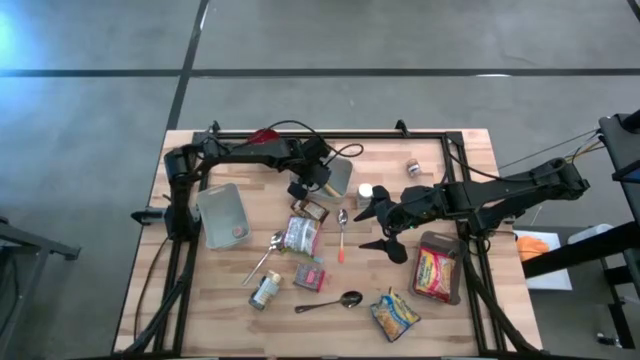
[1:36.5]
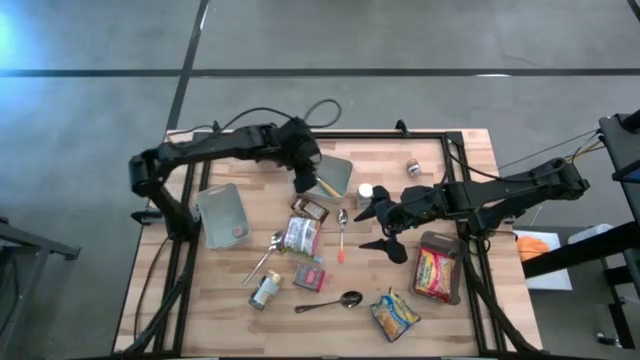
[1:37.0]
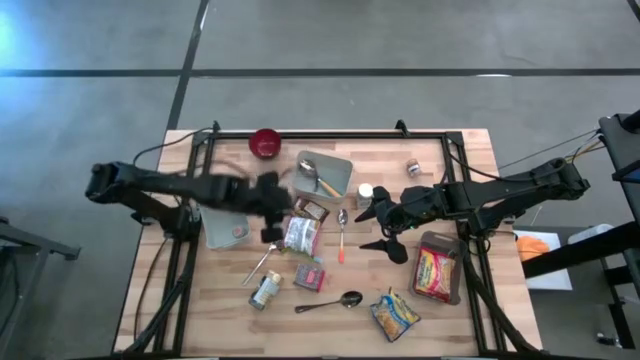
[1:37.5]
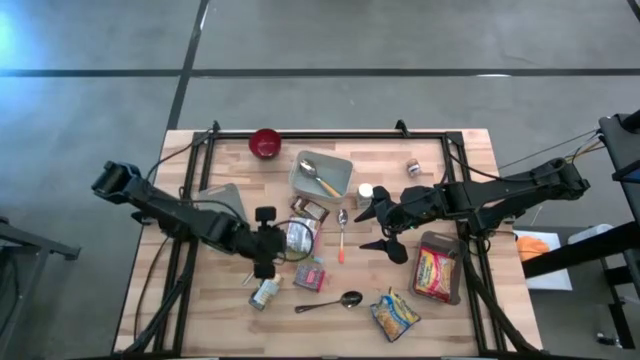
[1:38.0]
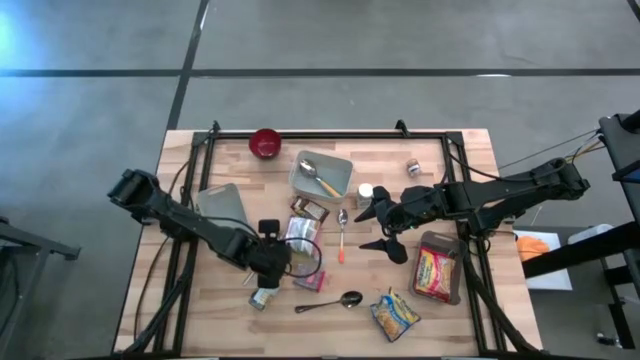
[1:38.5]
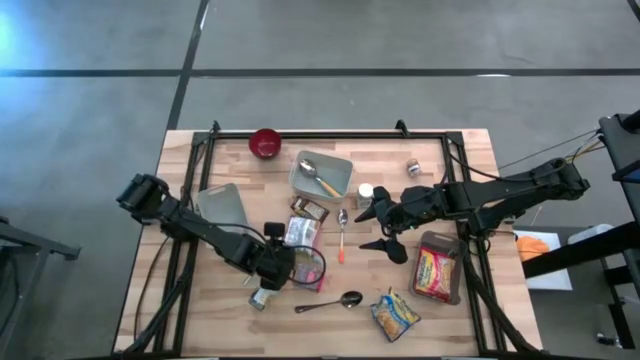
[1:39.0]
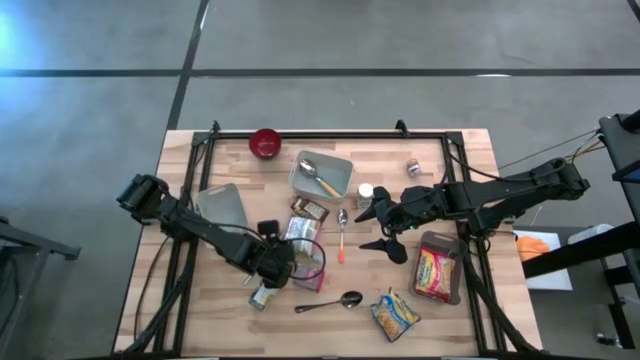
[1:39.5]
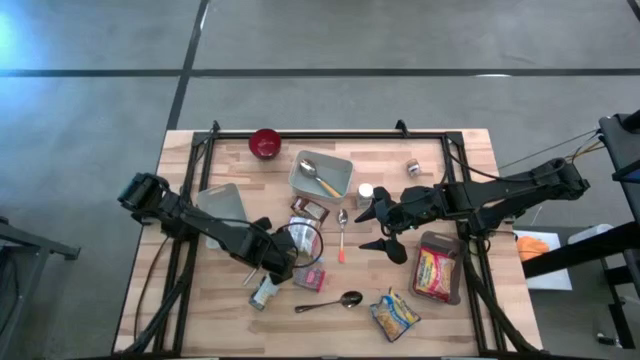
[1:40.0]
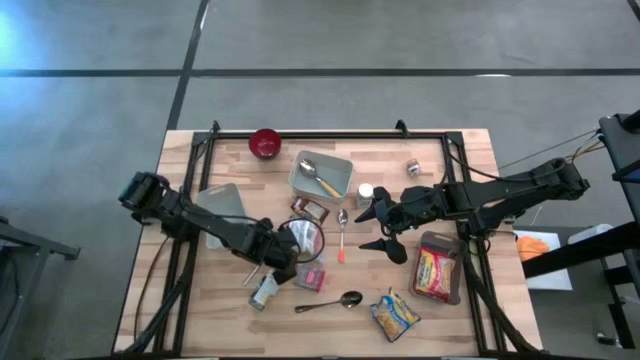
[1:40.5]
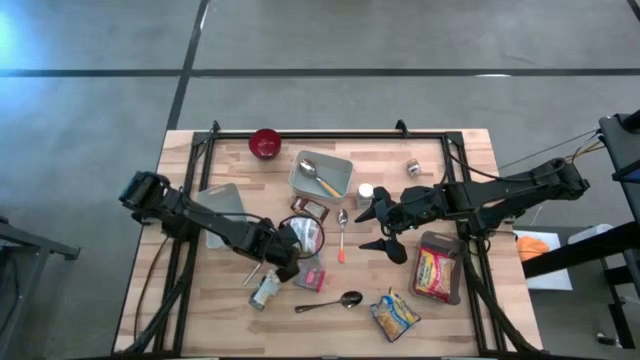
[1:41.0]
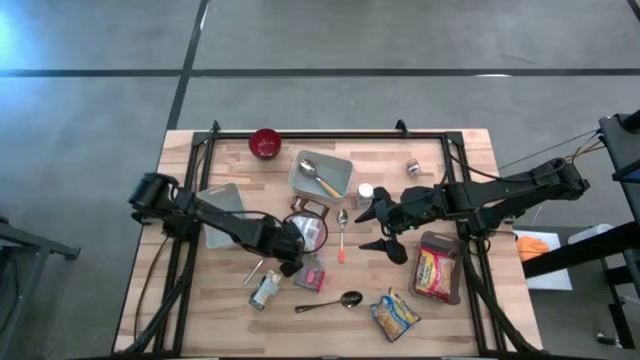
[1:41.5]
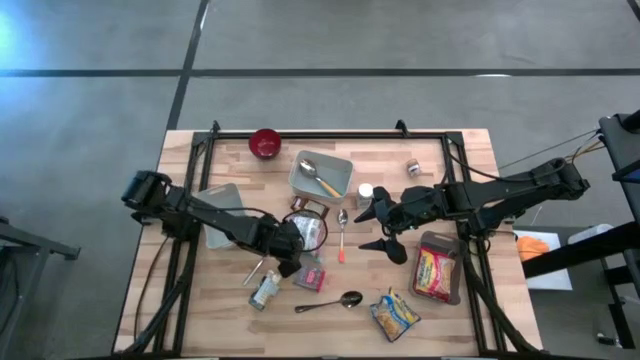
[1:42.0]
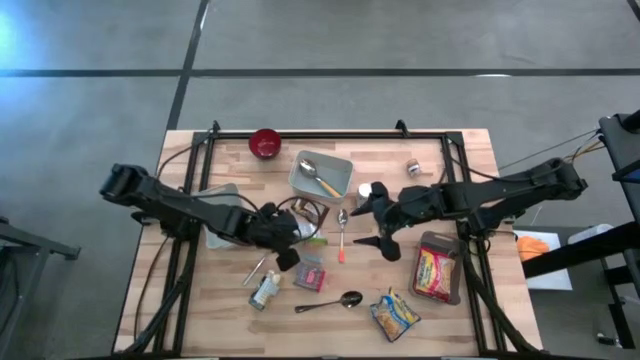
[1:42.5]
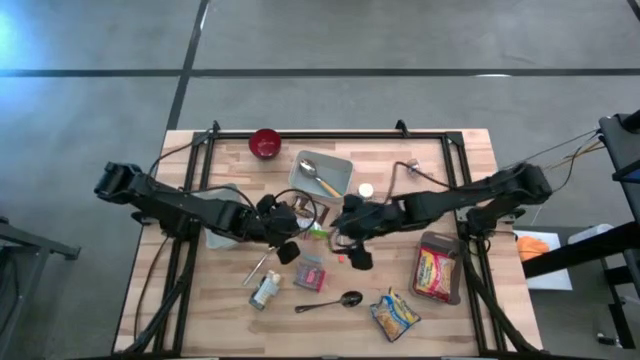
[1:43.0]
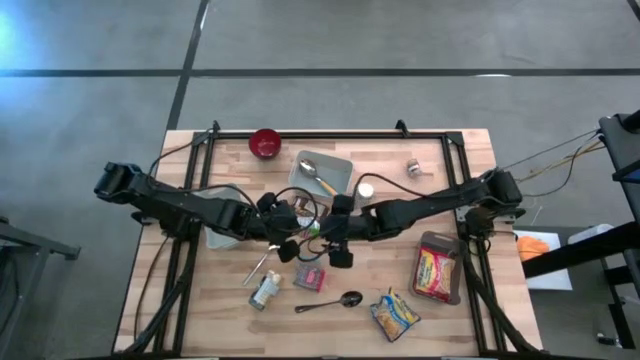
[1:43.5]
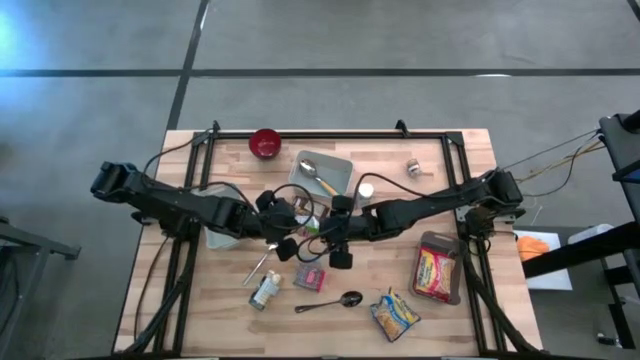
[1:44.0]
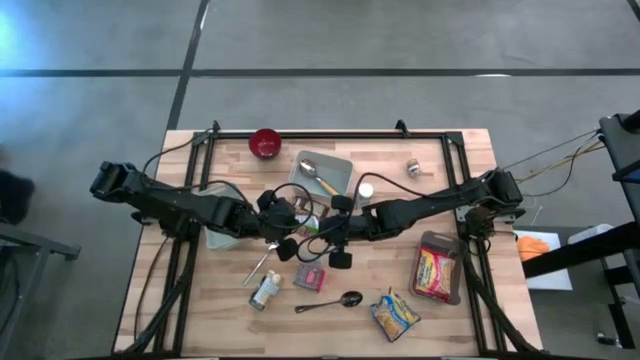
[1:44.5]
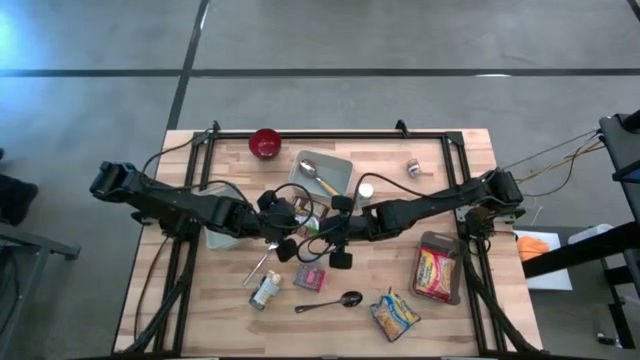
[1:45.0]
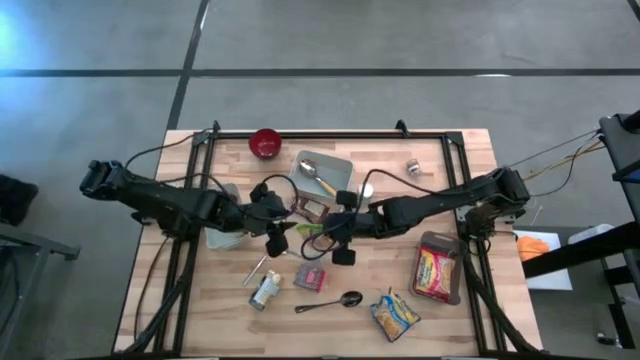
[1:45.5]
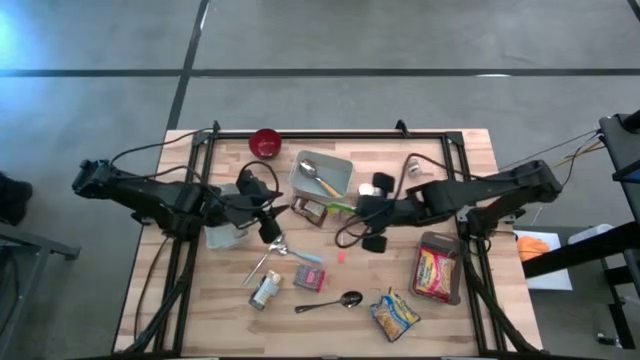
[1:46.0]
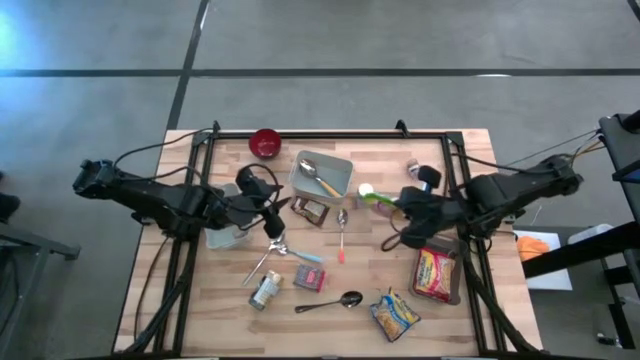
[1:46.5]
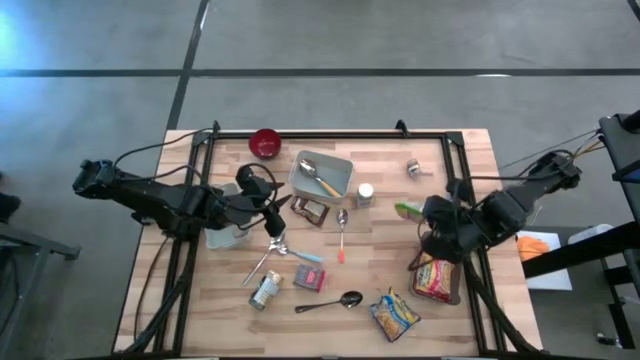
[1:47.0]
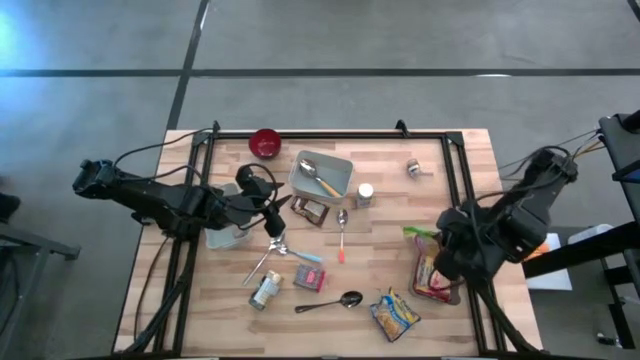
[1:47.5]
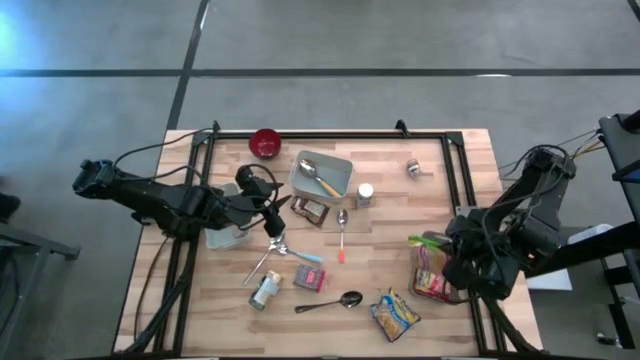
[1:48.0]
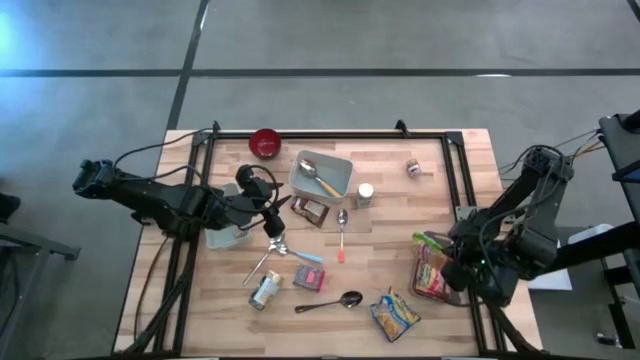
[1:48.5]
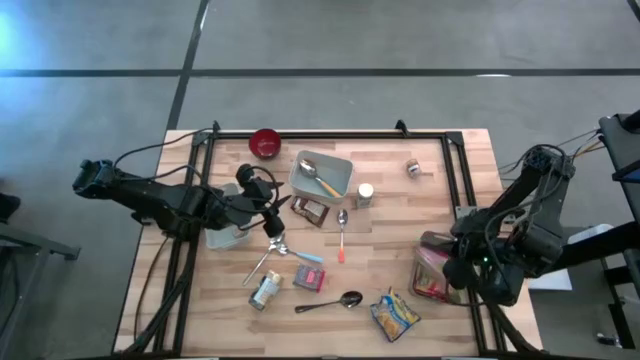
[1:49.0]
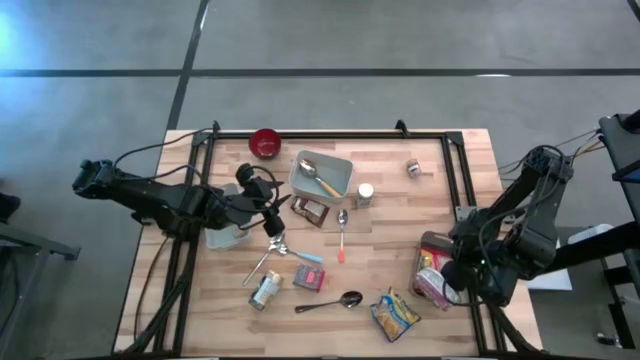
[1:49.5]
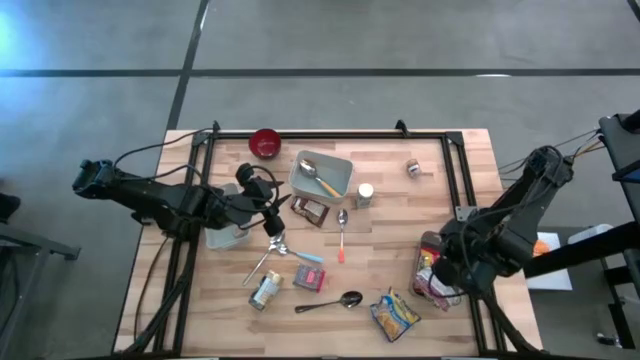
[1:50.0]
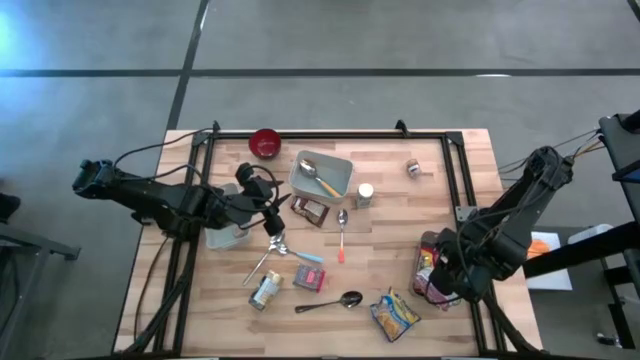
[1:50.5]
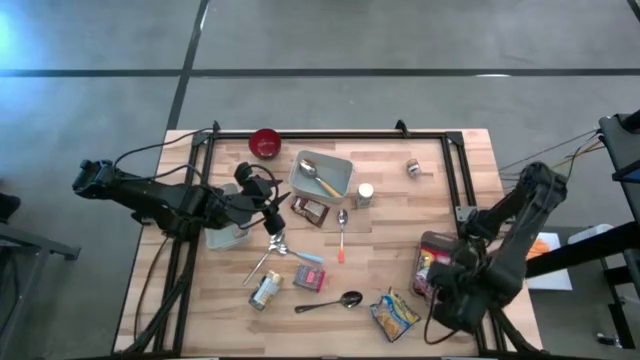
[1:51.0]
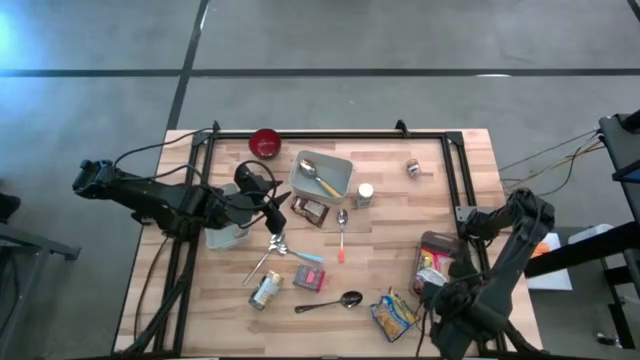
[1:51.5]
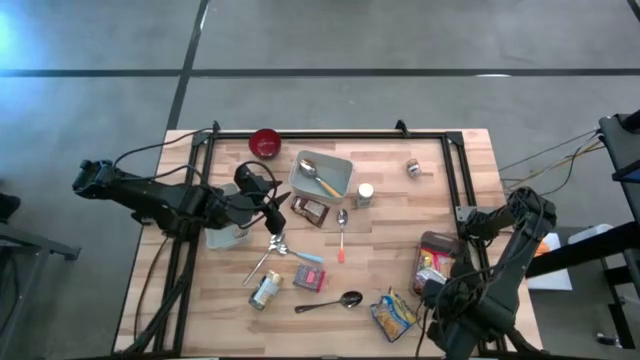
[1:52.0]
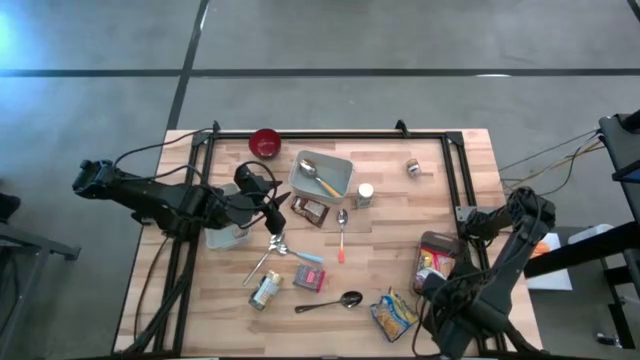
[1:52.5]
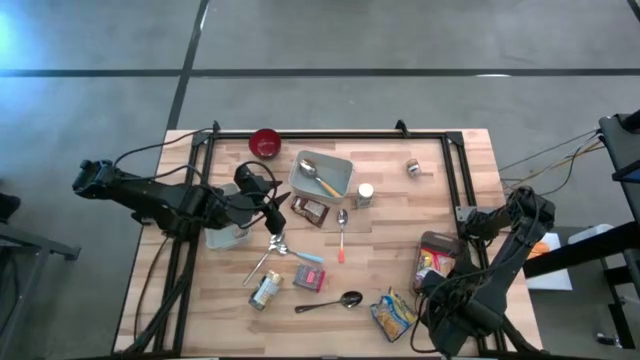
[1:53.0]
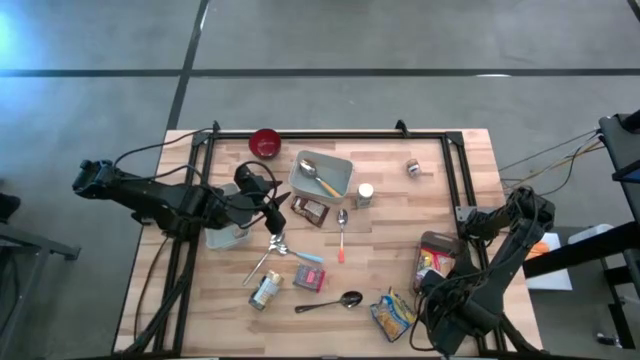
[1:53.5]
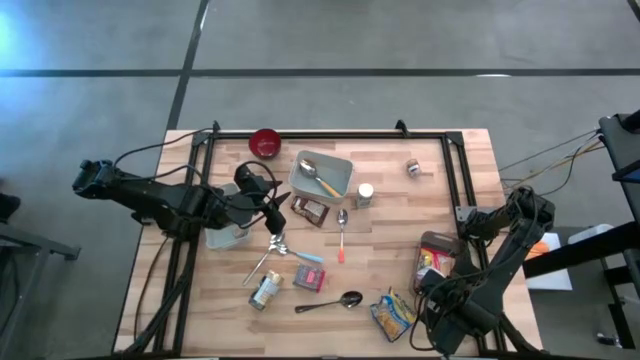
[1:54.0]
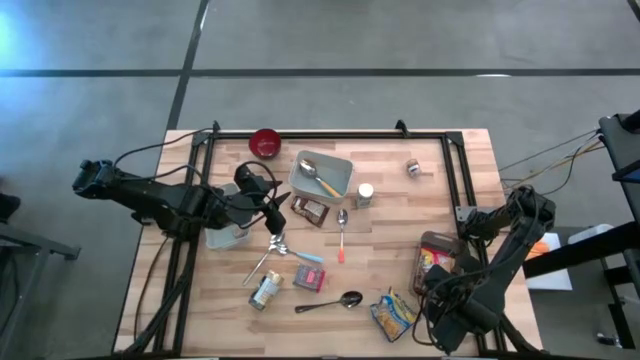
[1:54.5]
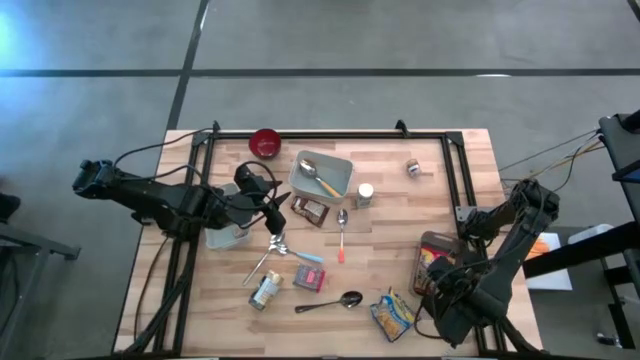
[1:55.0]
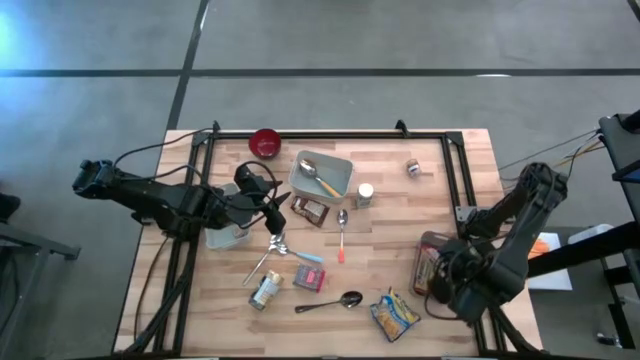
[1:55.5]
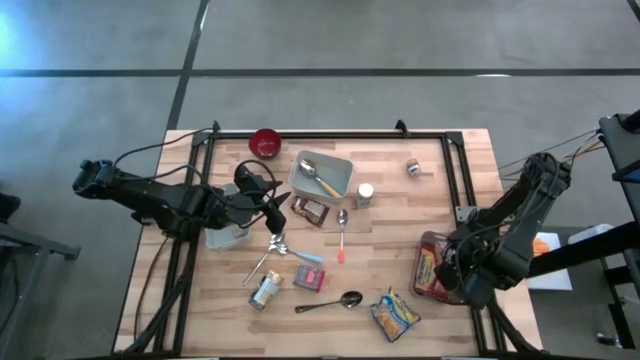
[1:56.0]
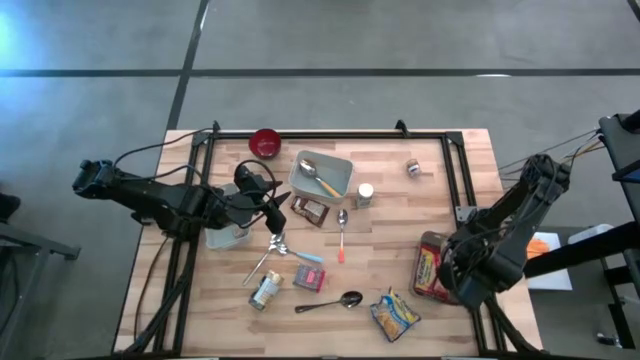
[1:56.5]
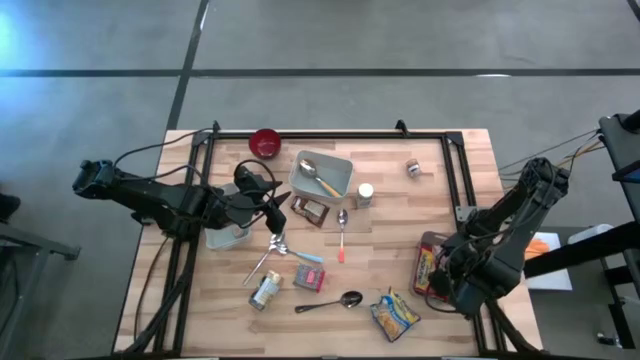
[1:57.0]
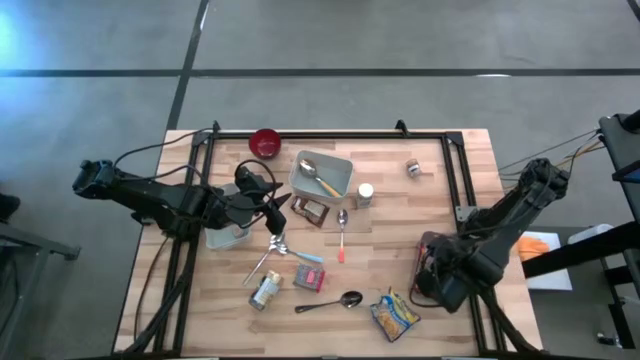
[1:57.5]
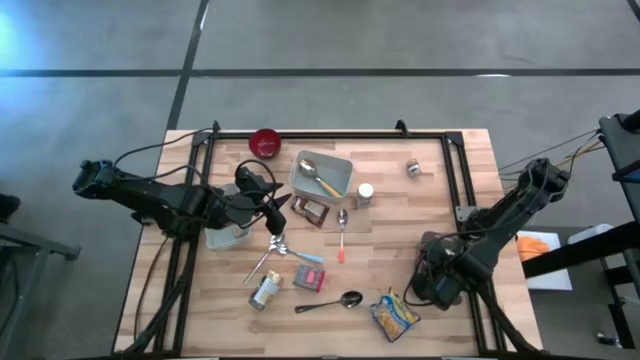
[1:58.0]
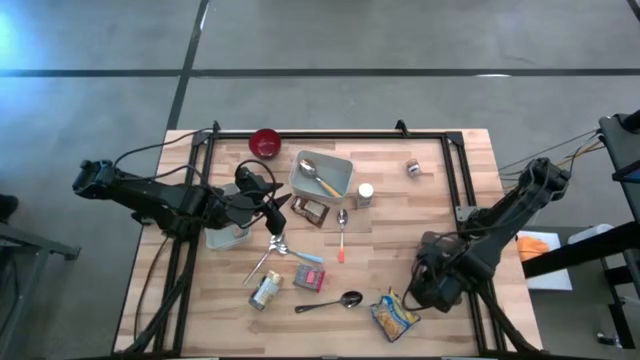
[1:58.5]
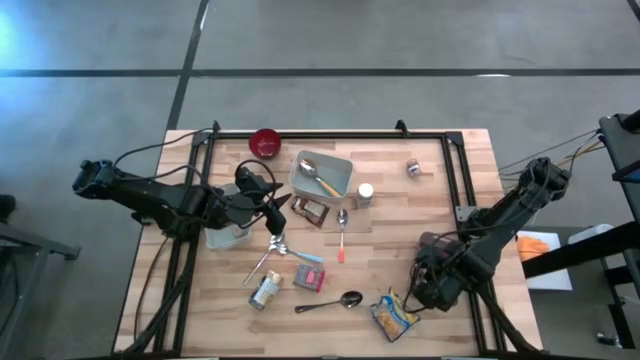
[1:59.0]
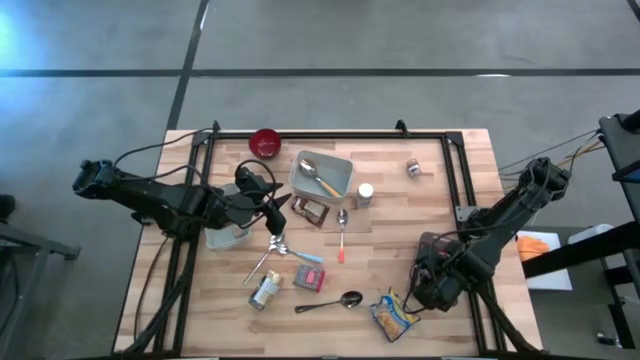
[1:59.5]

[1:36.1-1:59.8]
Put the green noodle pack into the black bin
